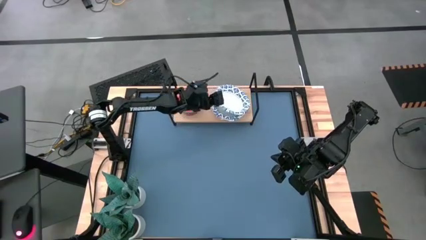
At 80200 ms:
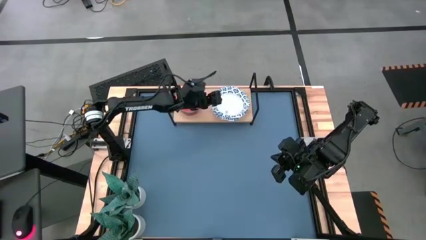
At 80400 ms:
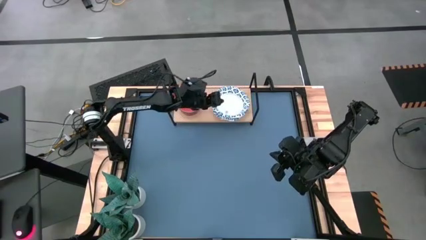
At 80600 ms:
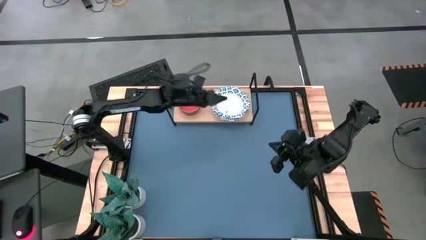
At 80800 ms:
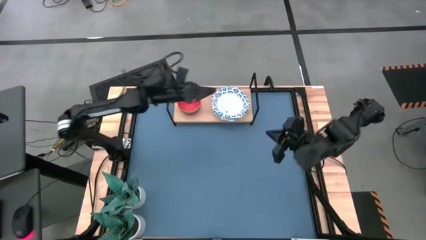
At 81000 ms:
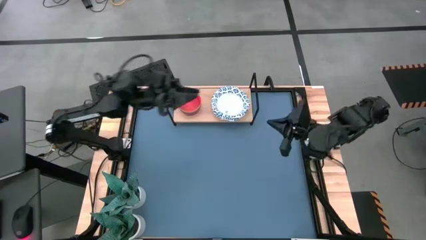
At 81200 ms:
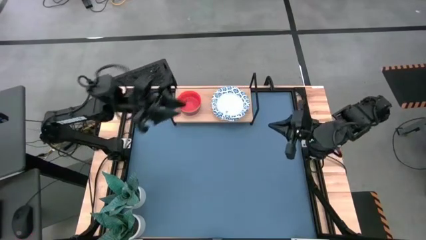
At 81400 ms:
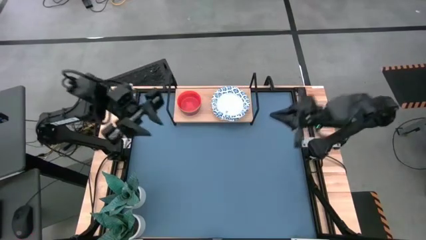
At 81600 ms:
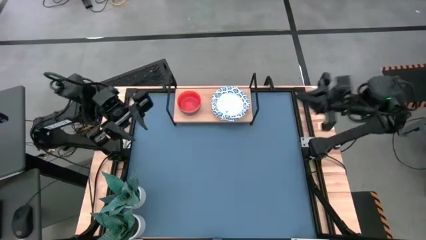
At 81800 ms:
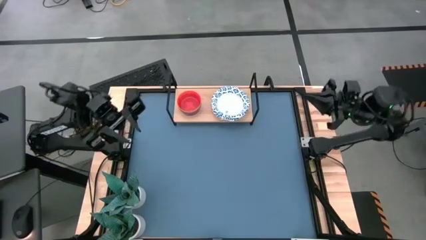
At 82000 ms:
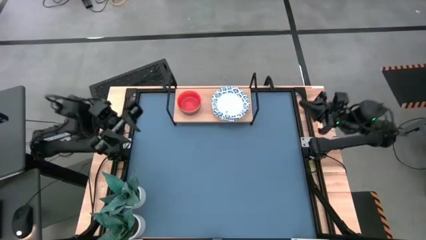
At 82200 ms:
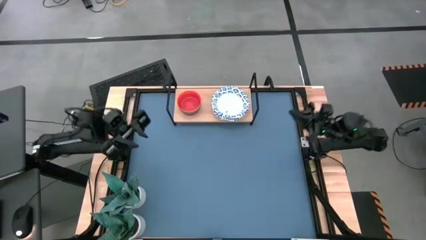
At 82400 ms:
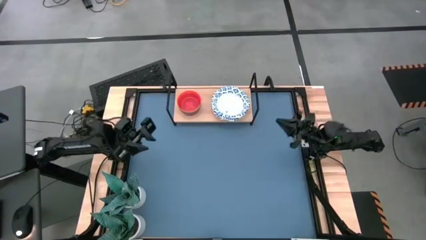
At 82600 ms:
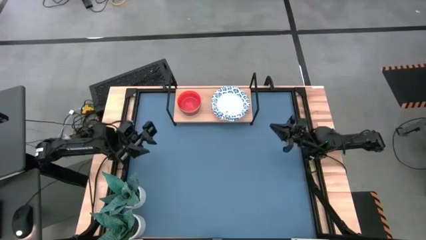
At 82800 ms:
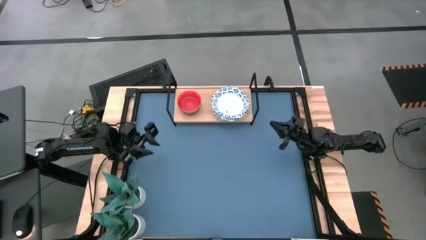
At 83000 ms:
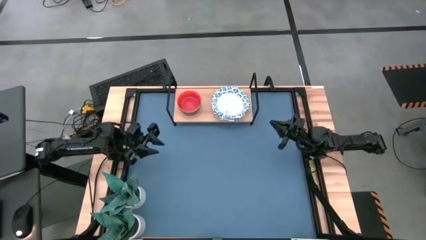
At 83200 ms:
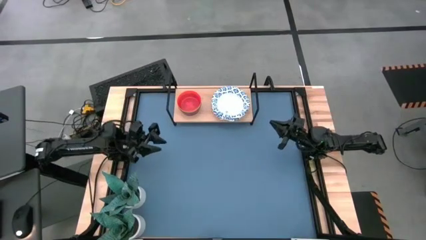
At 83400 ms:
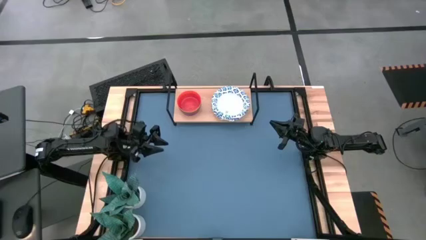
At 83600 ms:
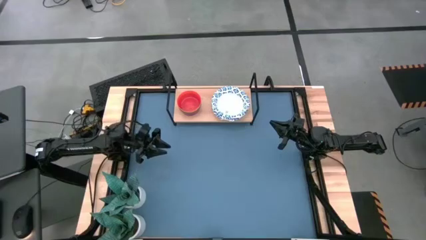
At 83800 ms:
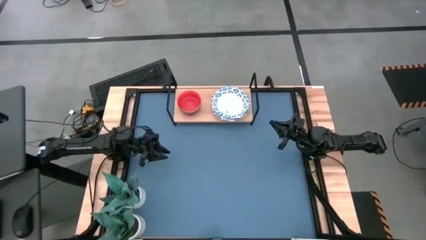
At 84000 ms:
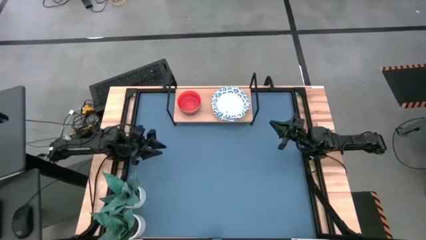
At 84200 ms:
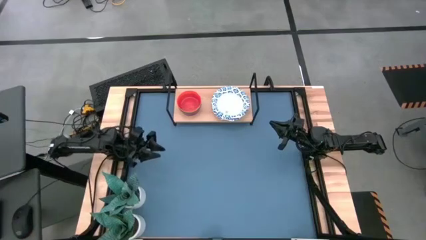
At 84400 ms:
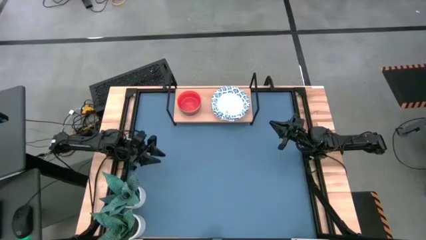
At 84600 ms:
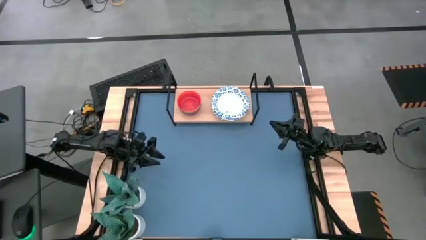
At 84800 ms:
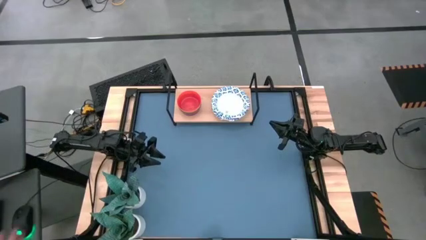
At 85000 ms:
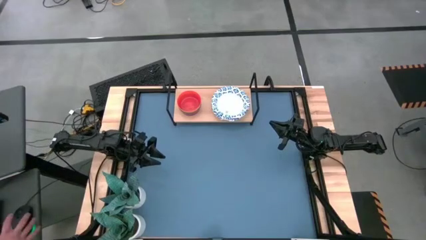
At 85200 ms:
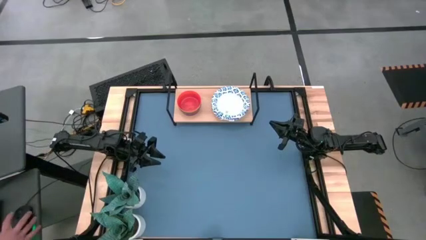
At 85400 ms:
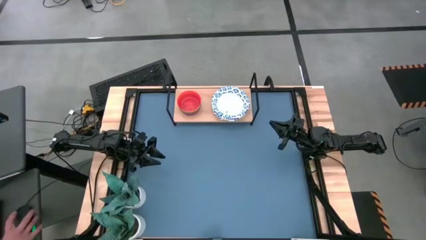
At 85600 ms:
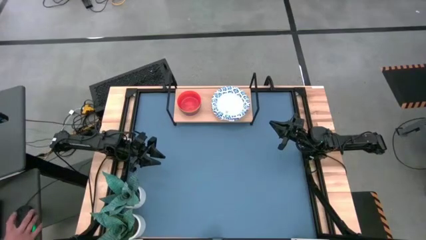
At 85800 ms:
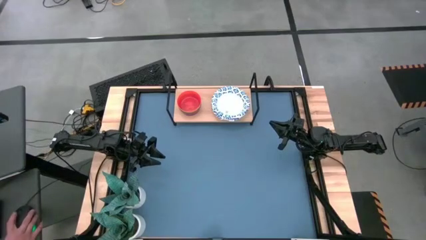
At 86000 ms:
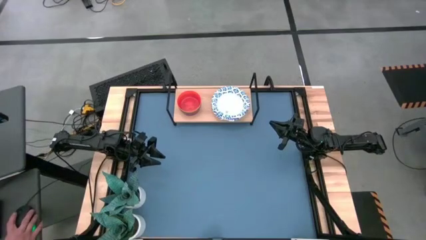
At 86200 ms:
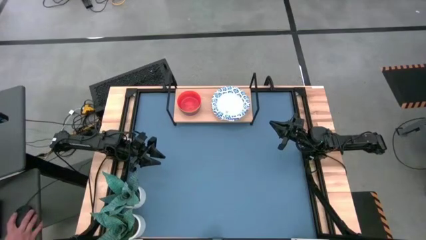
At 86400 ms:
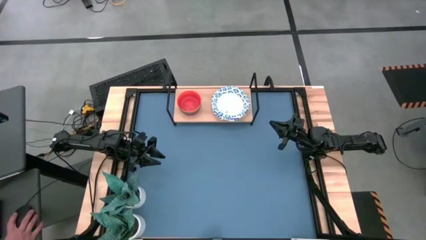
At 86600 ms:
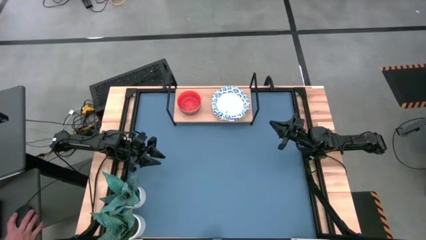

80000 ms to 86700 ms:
Task: Place and stack bowls onto a shelf
Return to Home Position

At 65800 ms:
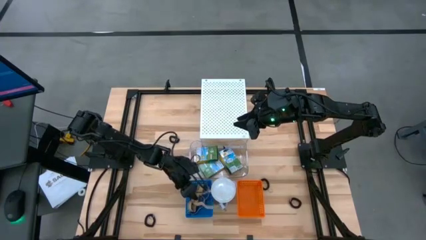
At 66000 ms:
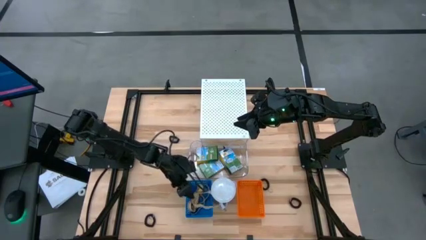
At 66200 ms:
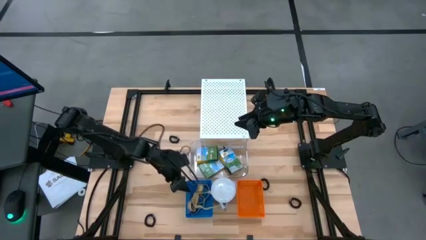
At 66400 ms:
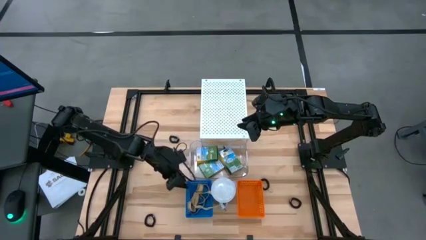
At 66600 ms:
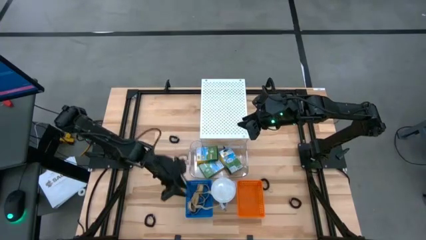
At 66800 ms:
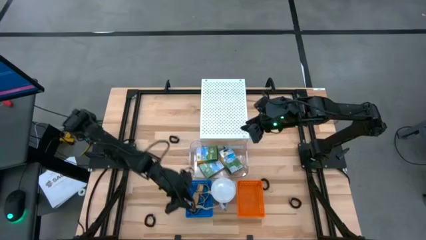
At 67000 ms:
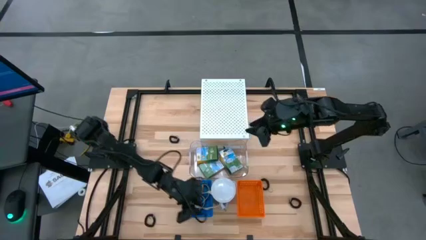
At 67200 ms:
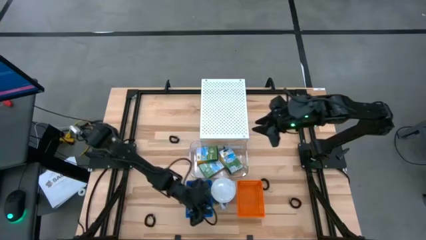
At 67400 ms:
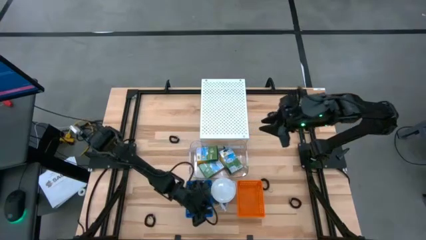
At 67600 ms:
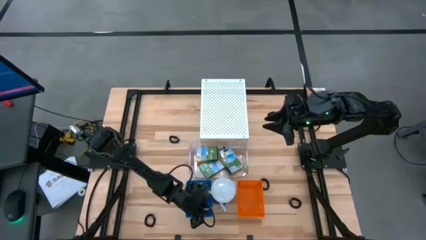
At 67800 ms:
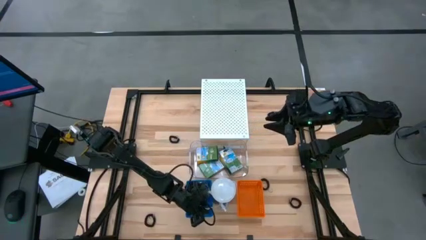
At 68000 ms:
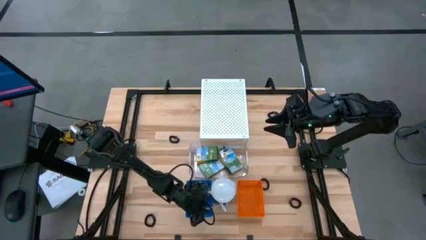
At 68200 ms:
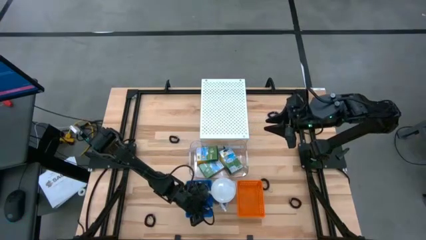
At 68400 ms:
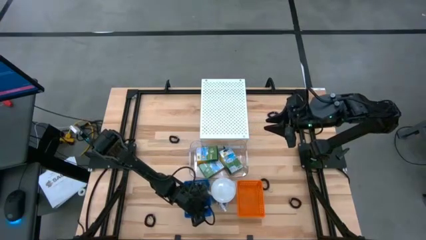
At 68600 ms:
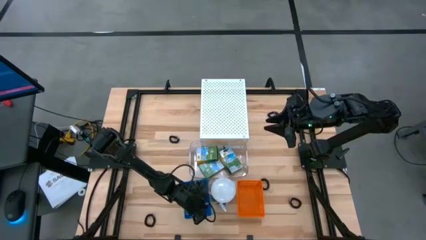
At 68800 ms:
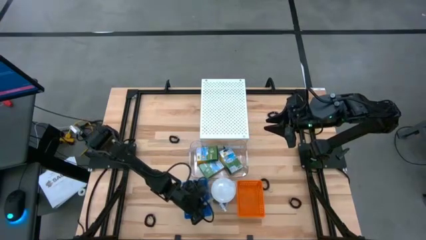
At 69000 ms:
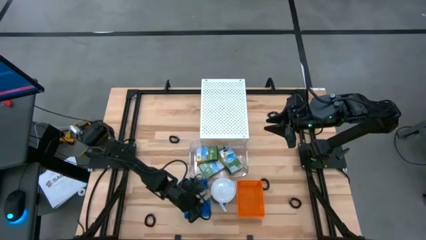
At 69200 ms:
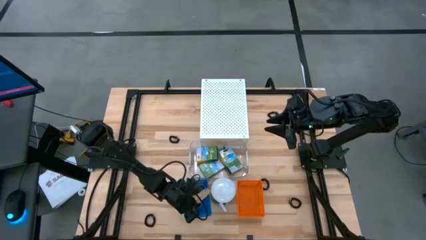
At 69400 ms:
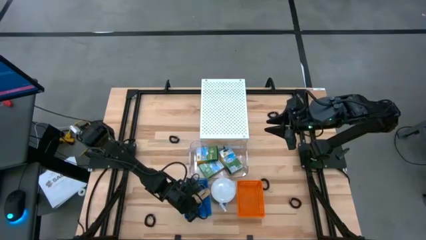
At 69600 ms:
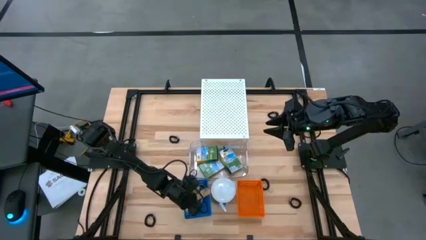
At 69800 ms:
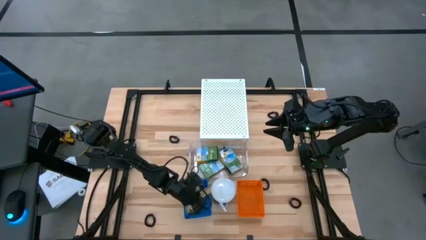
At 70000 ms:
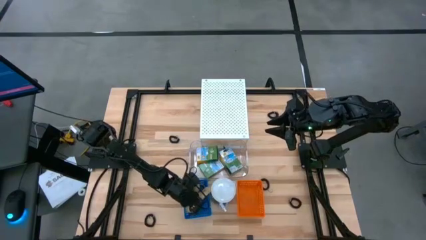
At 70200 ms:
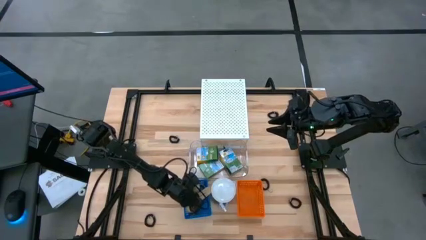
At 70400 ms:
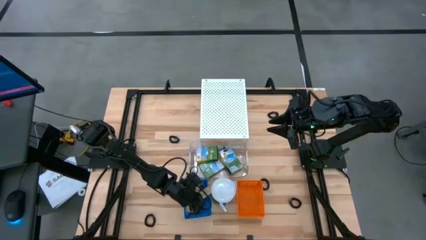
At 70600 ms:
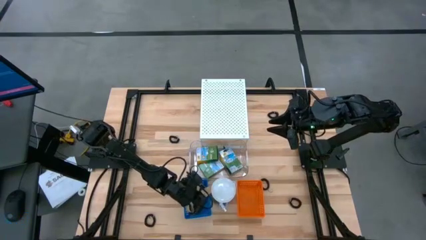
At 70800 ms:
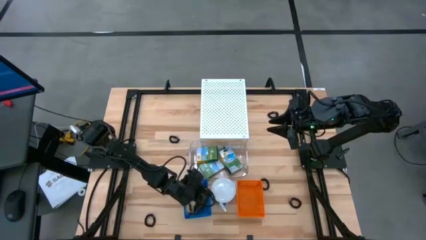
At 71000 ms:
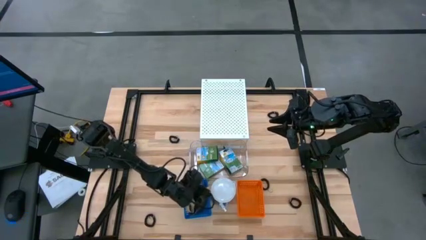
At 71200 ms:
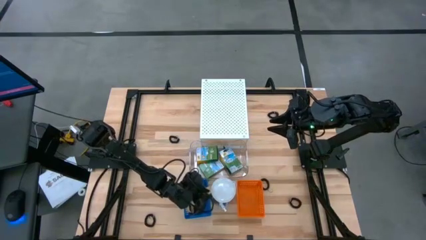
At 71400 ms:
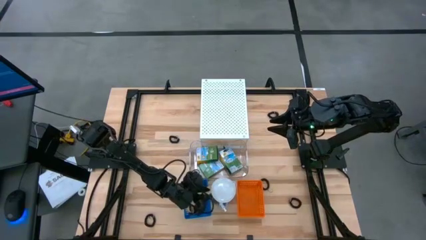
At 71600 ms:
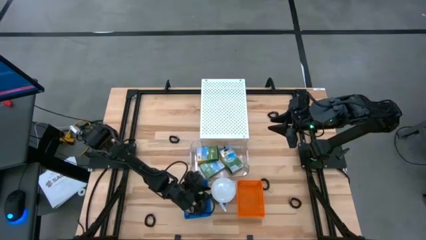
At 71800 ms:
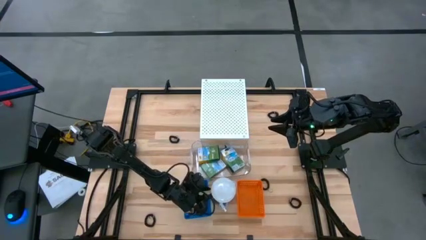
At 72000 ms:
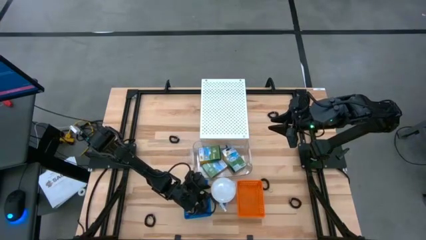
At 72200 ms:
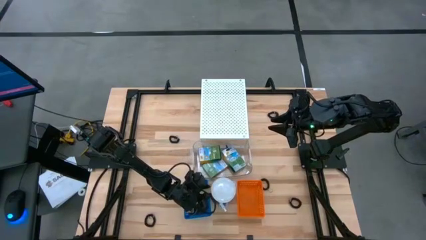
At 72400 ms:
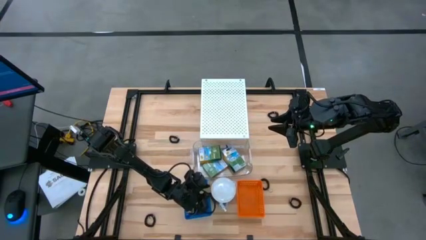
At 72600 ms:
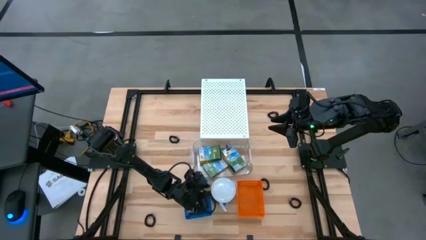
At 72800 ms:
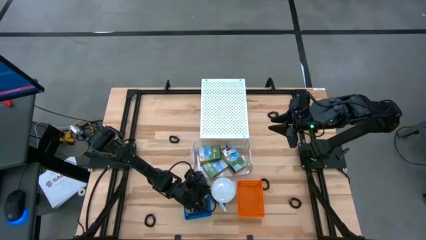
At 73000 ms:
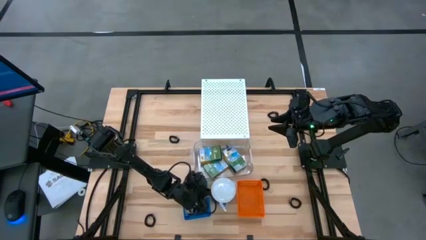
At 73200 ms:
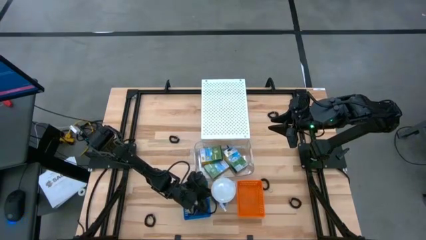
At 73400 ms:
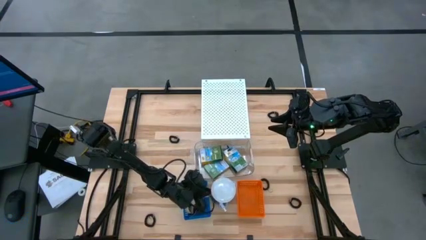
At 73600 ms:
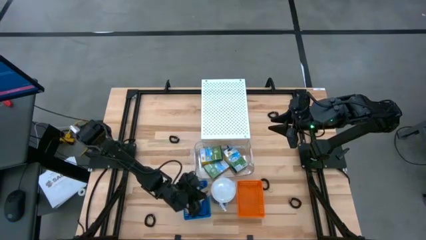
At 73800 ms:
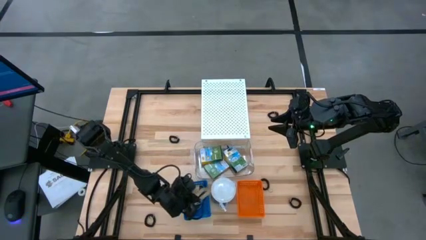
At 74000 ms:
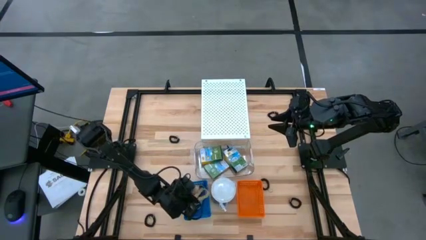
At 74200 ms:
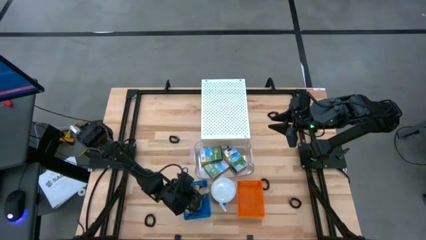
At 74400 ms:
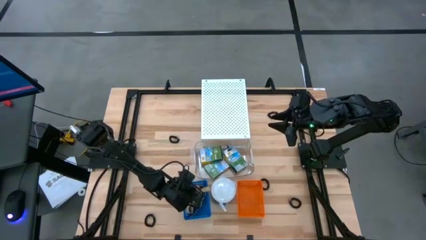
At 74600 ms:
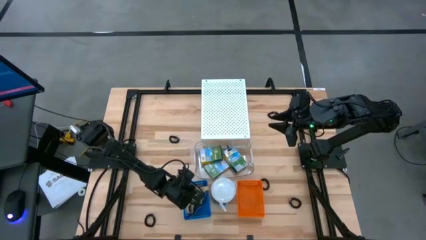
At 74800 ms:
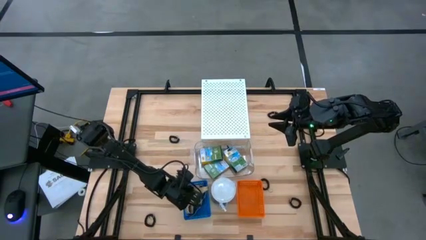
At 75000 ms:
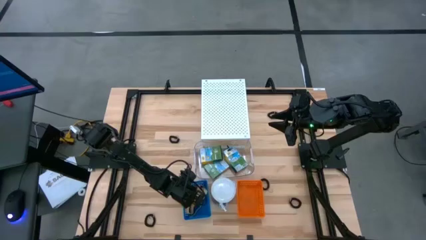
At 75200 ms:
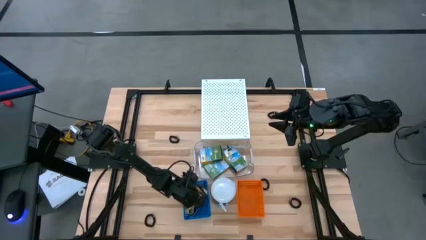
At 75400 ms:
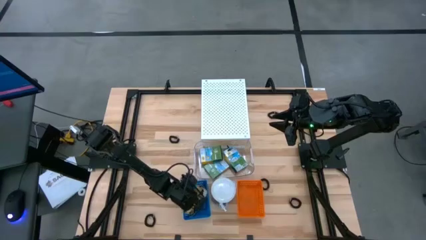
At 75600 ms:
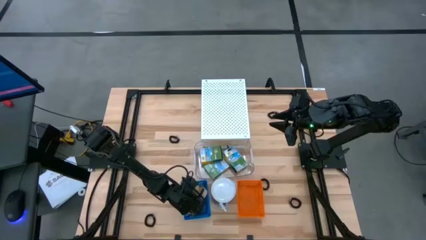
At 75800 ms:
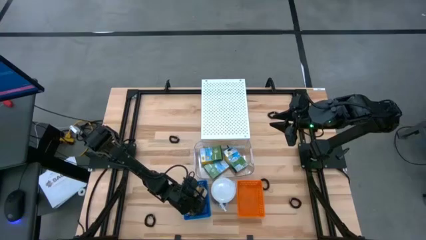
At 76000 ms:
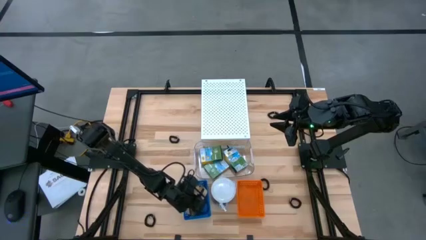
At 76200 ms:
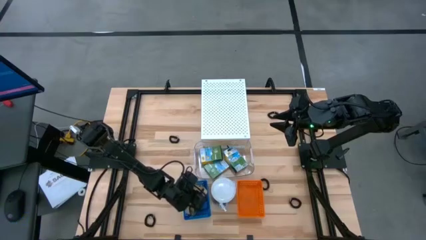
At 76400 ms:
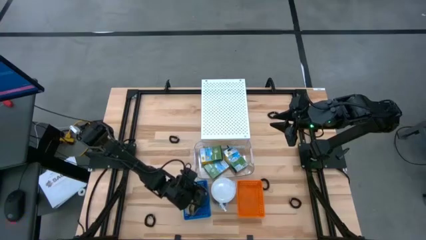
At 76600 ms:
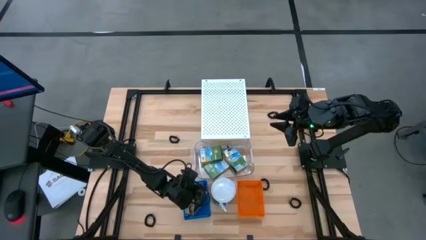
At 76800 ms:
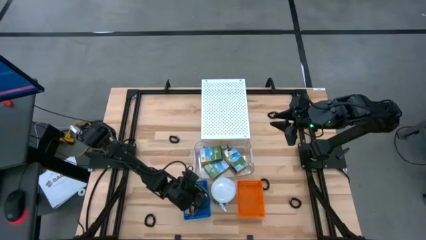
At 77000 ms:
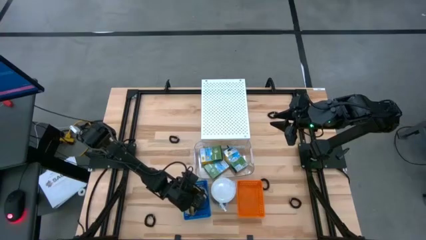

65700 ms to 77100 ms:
Task: Pick & Place Office Desk Supplies
Put the brown rubberband into the blue bin
